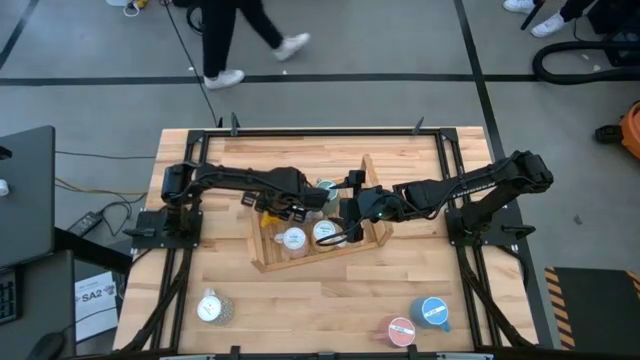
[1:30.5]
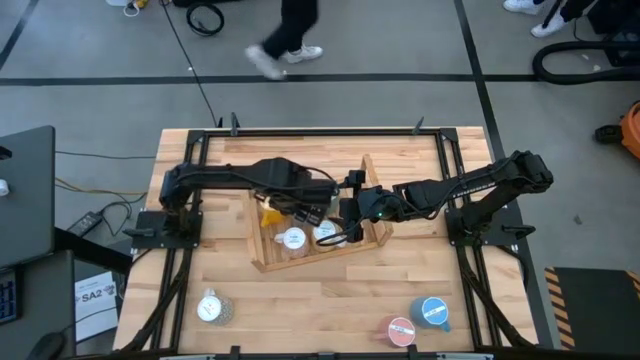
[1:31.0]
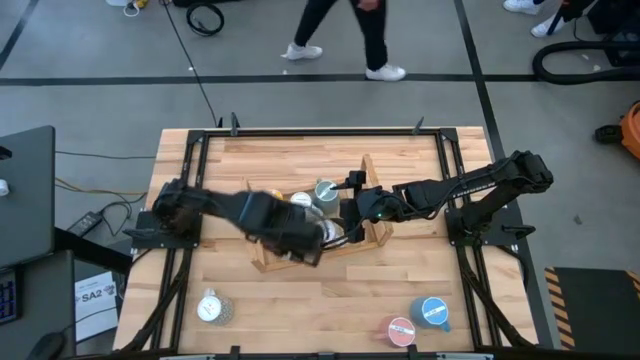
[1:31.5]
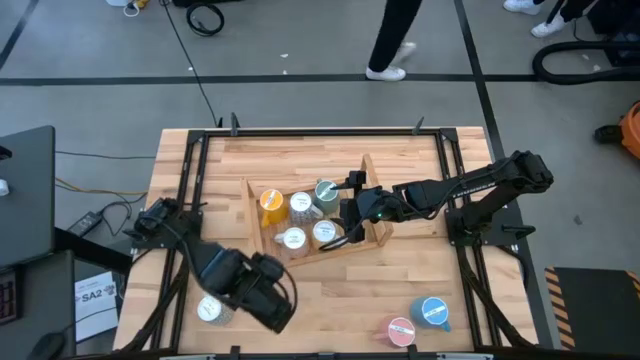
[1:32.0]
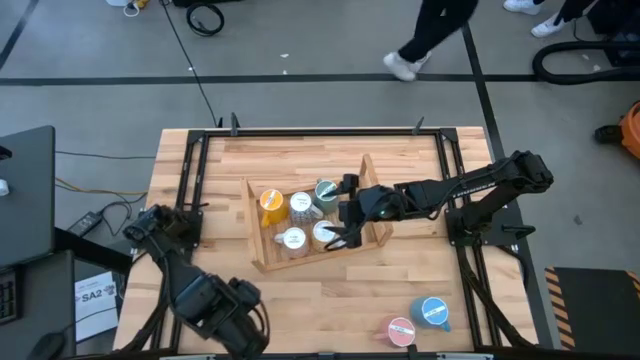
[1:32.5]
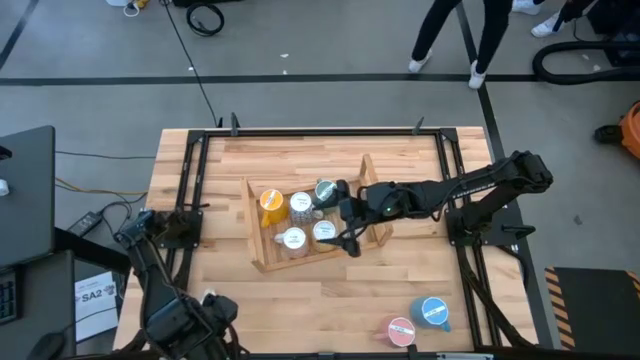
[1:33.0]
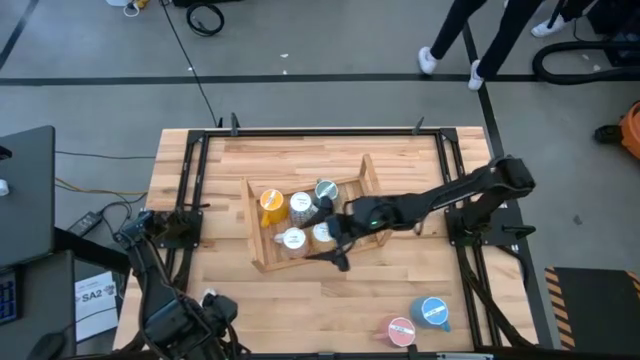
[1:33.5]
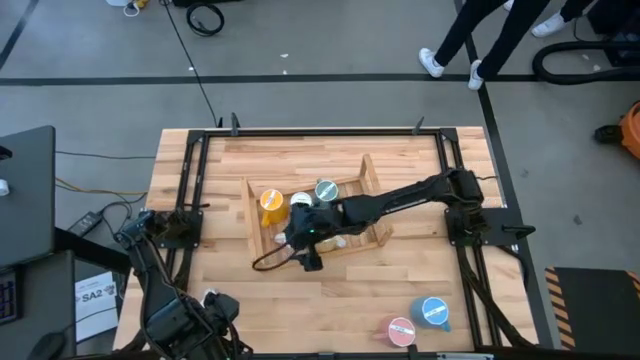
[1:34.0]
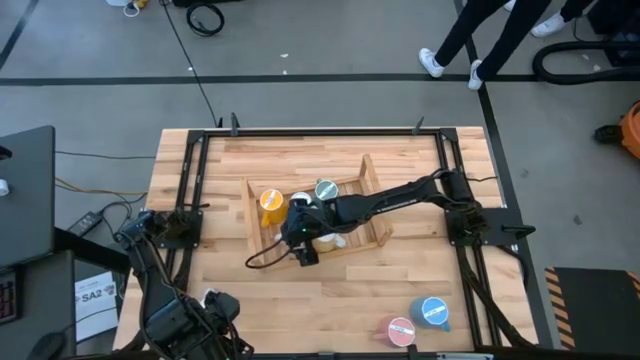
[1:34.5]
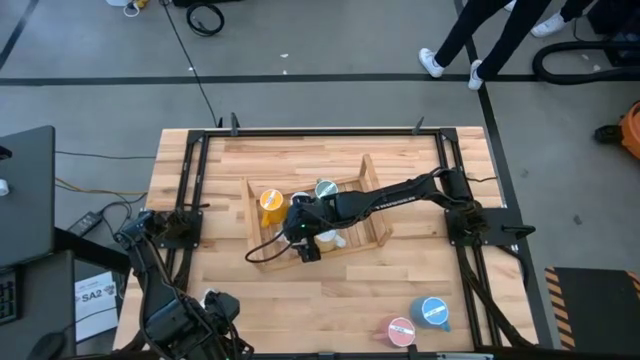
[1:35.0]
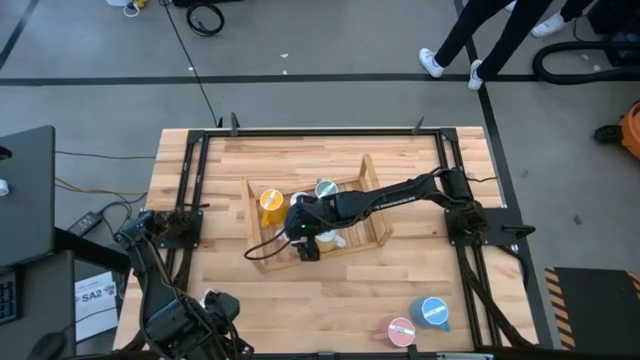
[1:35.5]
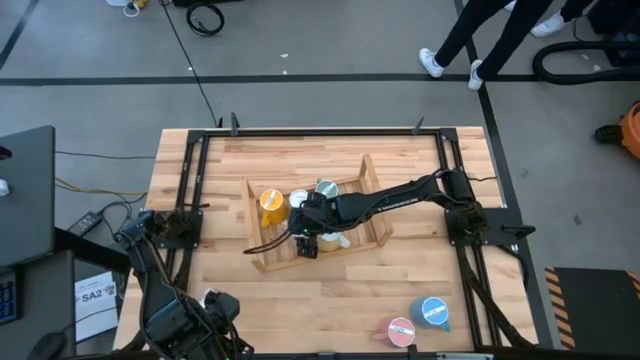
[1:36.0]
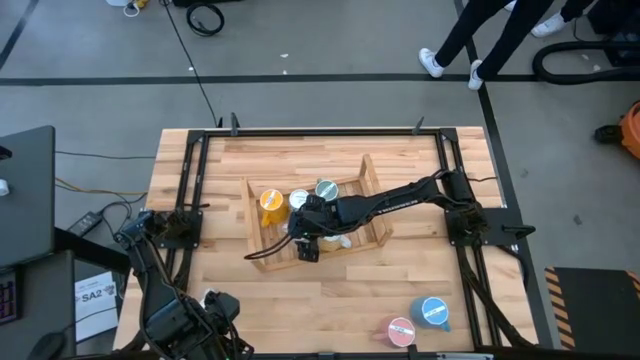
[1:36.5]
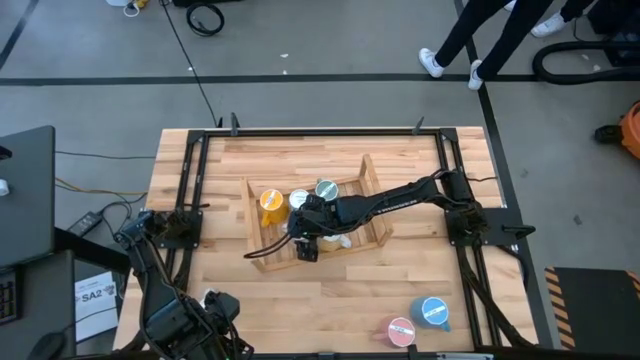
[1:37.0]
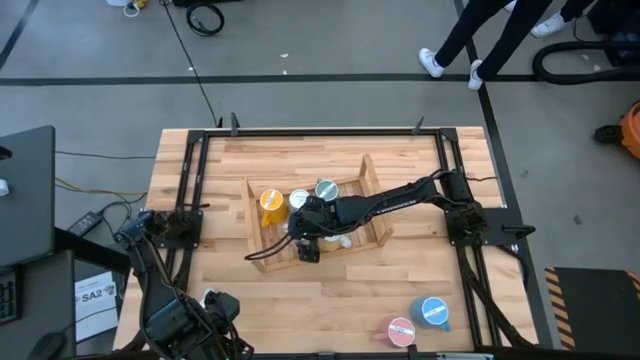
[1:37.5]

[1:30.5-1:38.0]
Task: Place coffee mugs
Adjust the orange patterned mug on the shelf

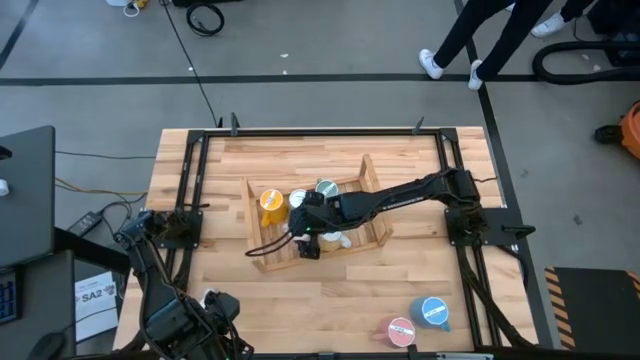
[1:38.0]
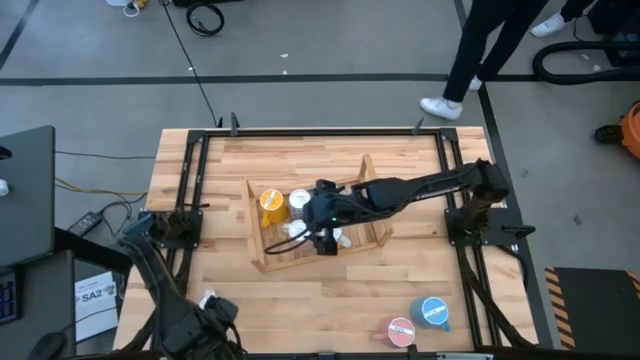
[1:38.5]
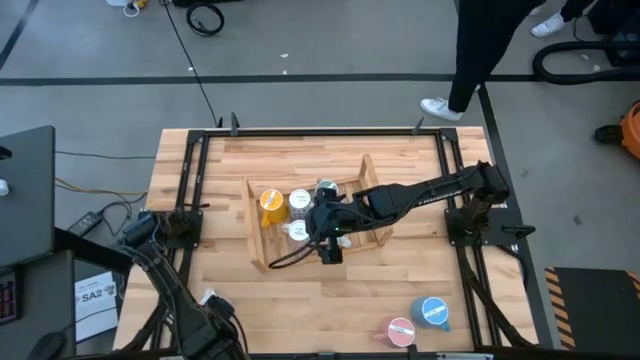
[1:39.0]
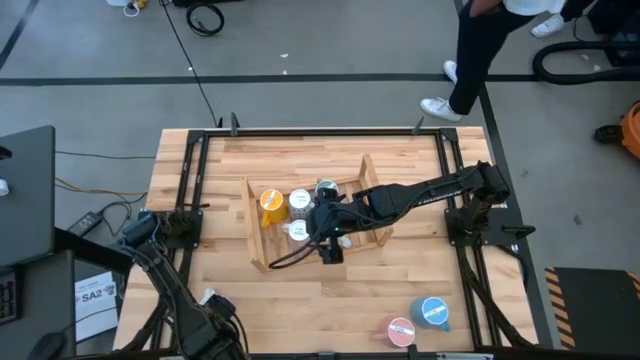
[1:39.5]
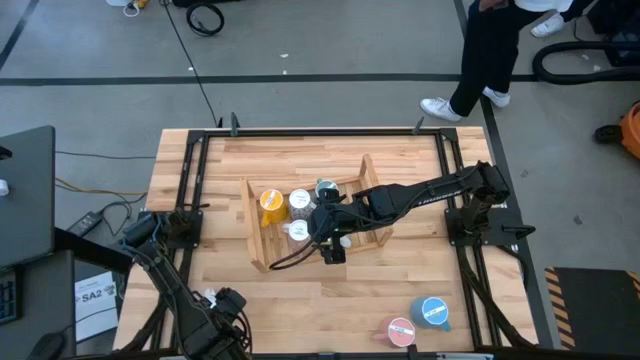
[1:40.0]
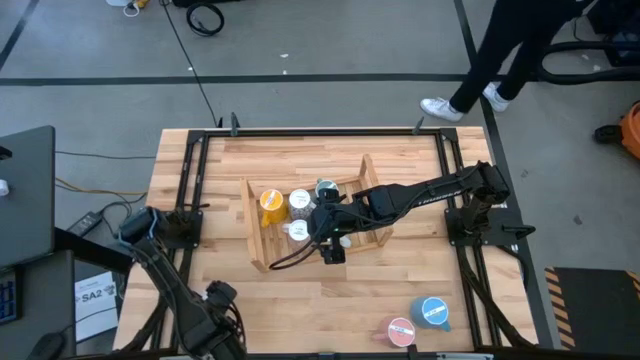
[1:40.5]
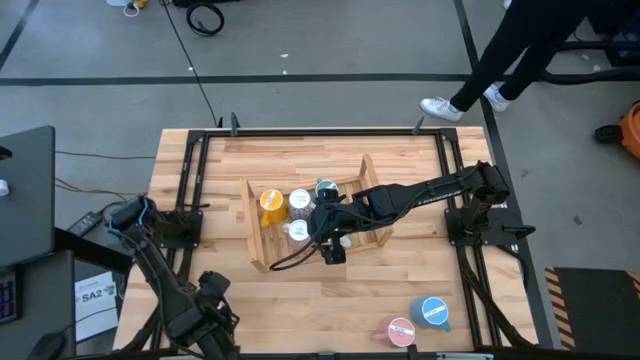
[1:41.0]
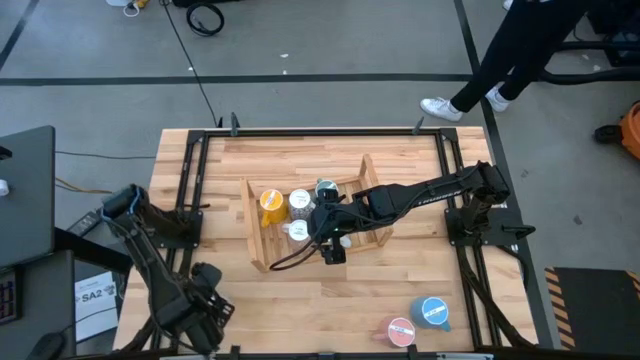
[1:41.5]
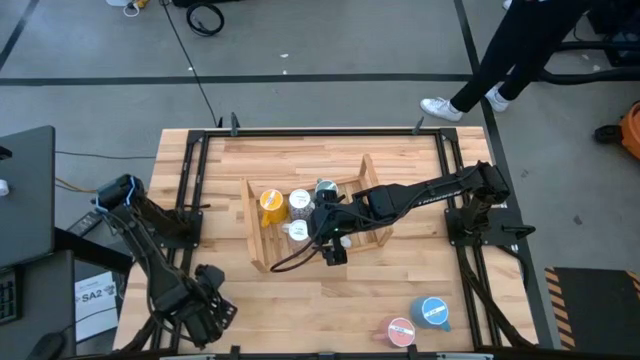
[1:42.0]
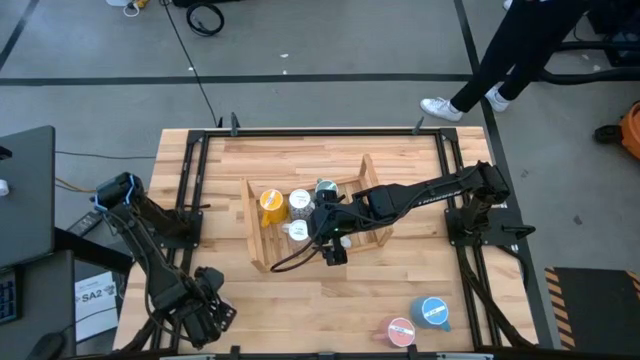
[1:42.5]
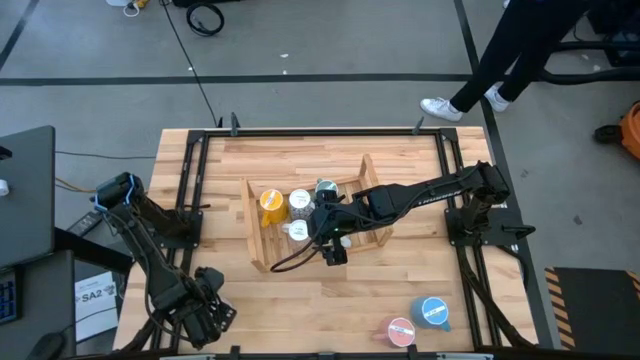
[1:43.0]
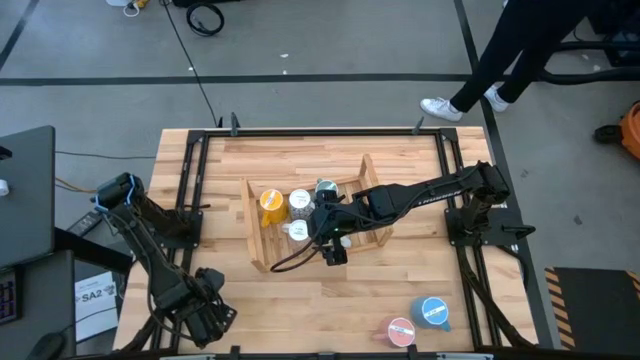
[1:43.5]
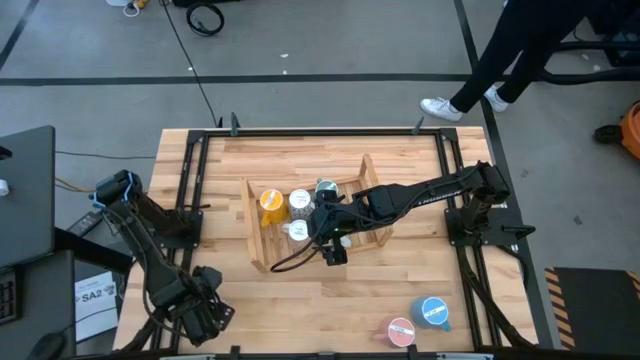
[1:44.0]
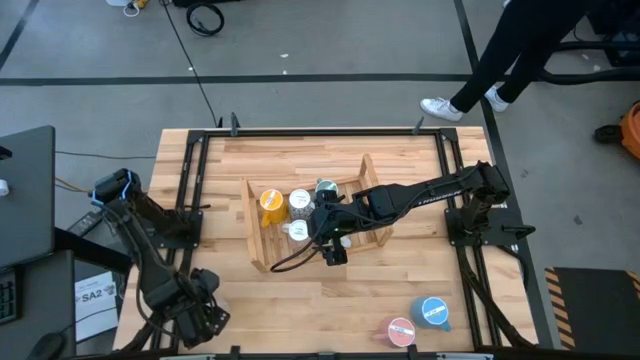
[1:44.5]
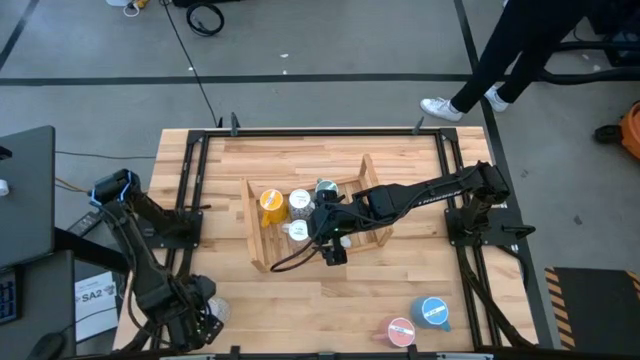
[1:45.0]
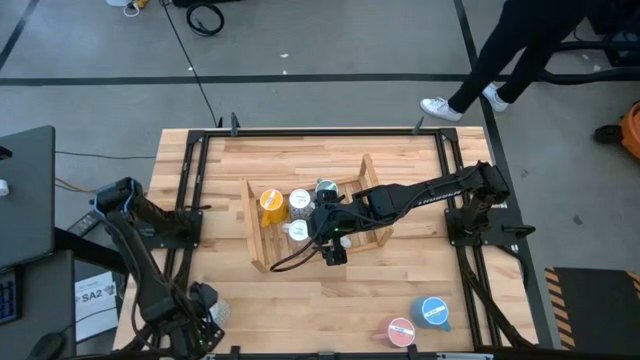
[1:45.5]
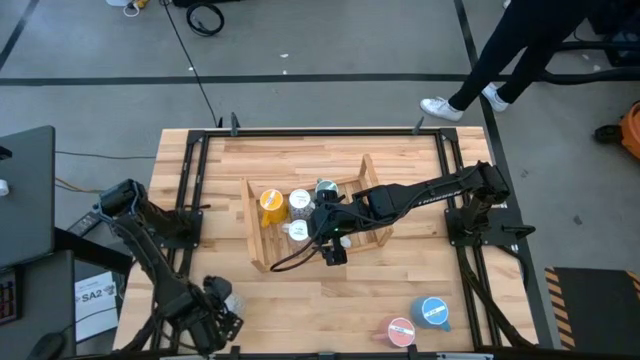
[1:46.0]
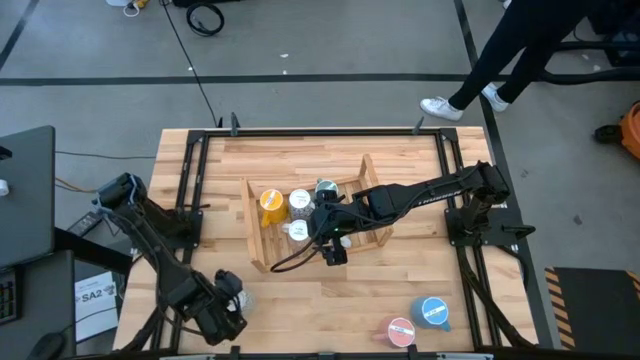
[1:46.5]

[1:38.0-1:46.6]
Adjust the gray patterned mug

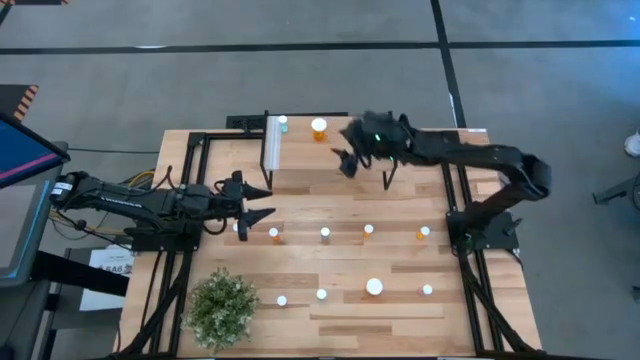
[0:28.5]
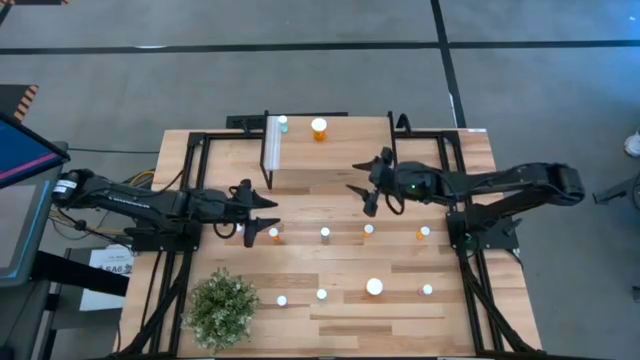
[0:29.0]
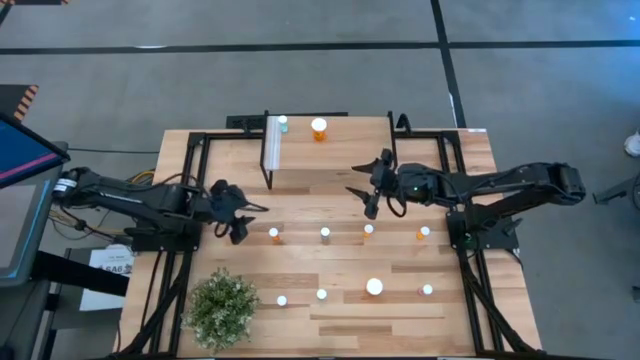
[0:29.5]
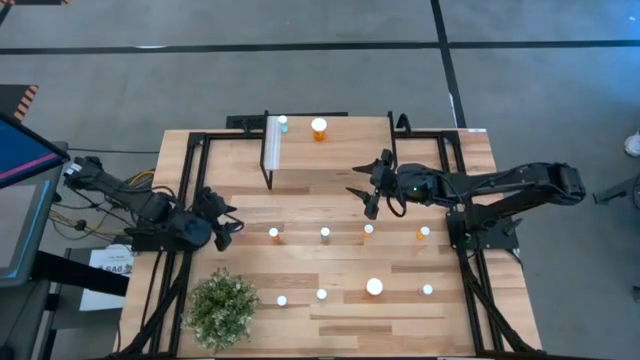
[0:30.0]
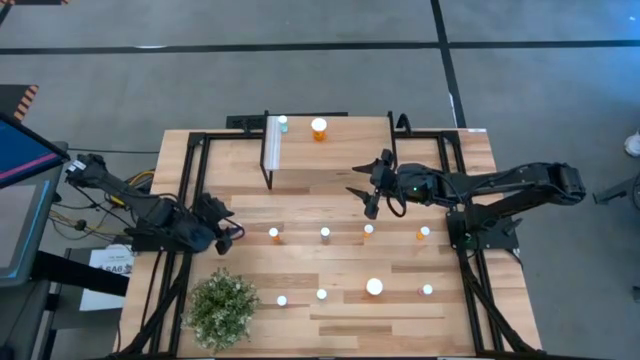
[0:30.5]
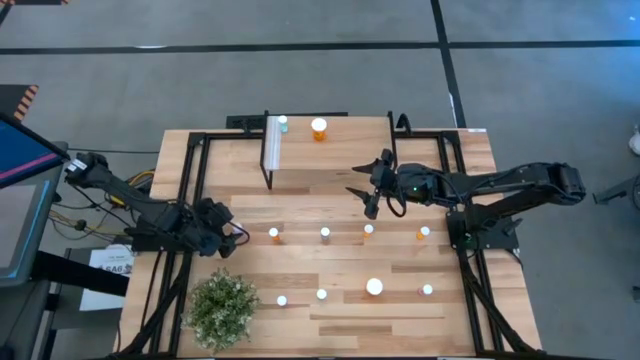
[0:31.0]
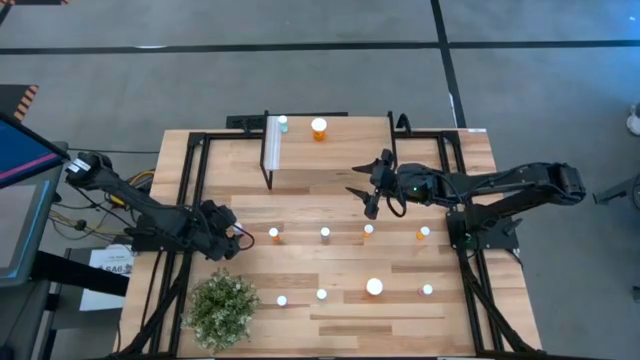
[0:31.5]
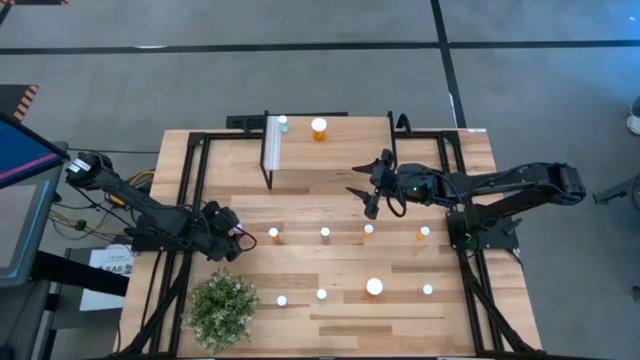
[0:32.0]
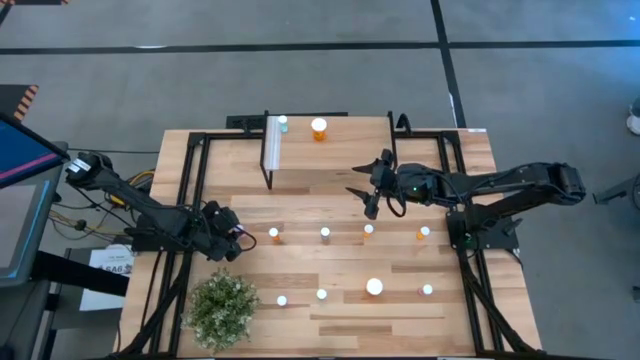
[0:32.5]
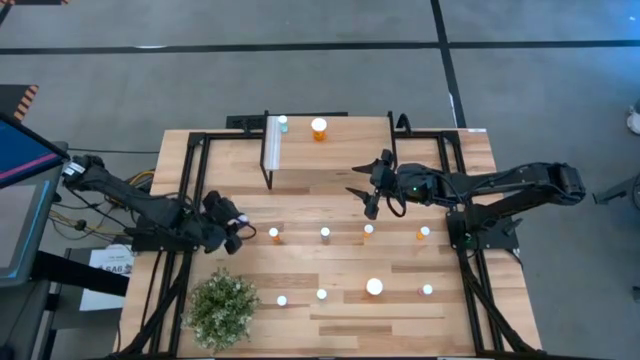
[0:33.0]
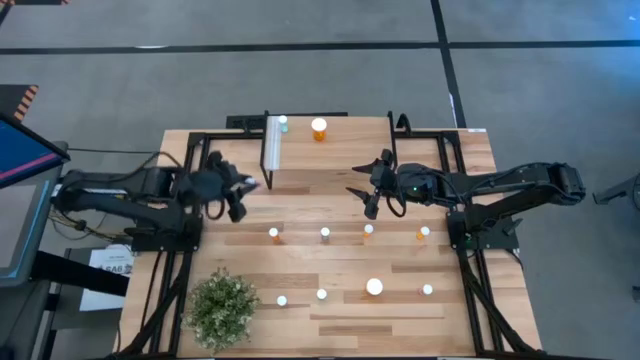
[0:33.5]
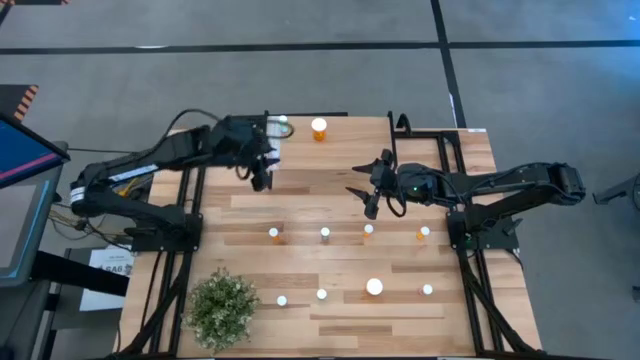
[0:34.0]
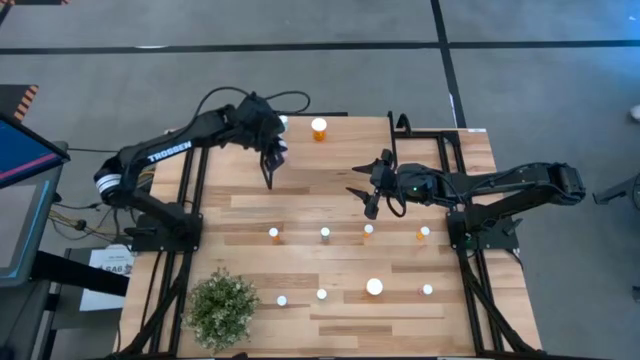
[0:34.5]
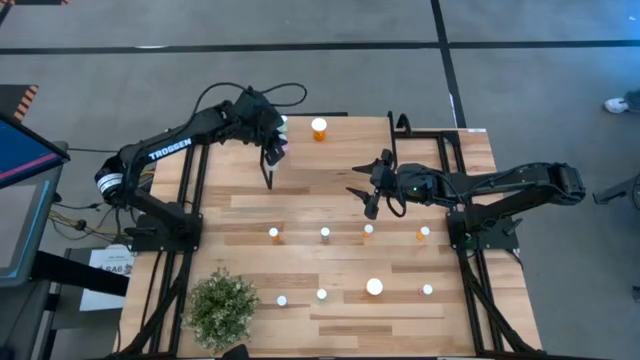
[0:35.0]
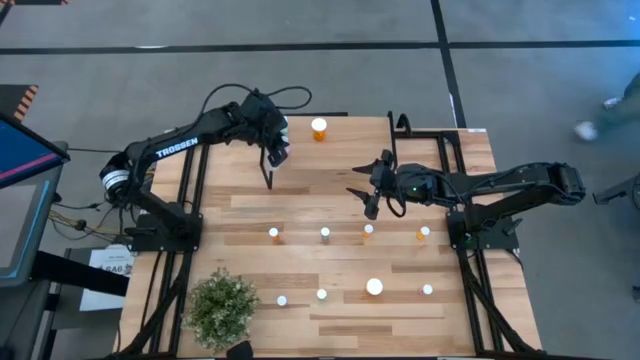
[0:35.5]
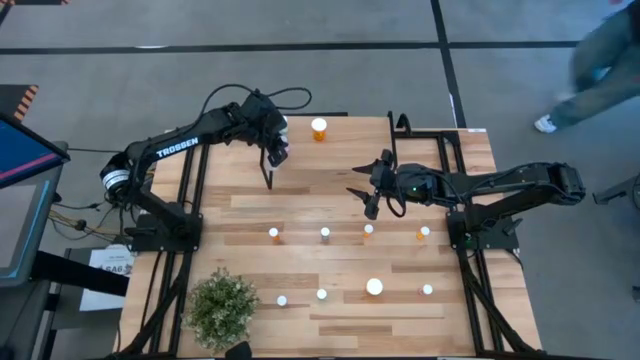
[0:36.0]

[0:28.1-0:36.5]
Task: Pick and place medicine bottles onto shelf by color
Put the top pink pill bottle on the shelf
